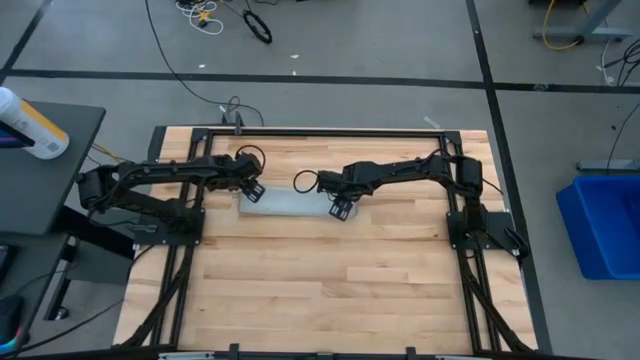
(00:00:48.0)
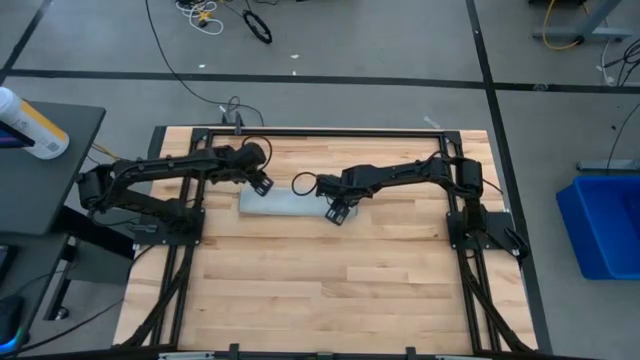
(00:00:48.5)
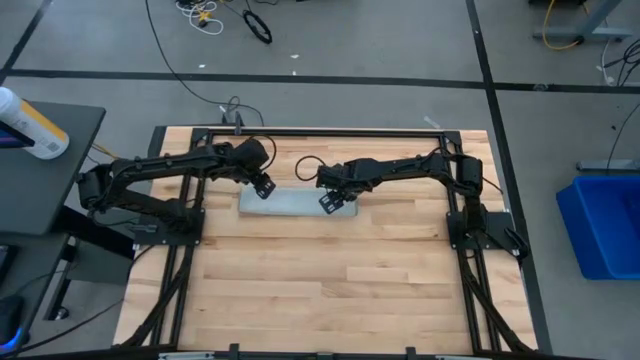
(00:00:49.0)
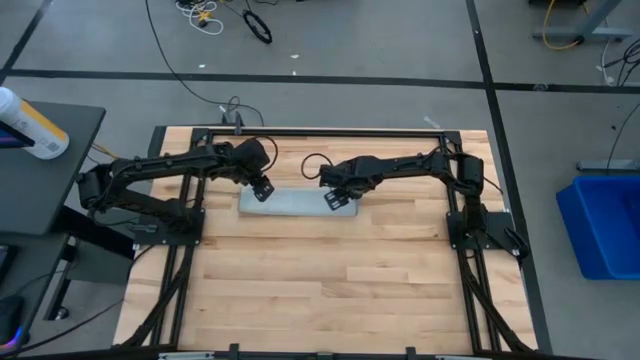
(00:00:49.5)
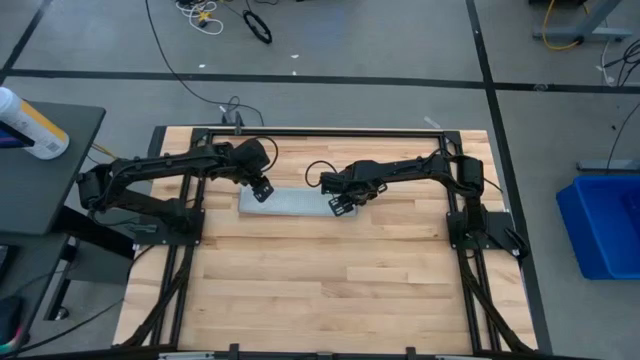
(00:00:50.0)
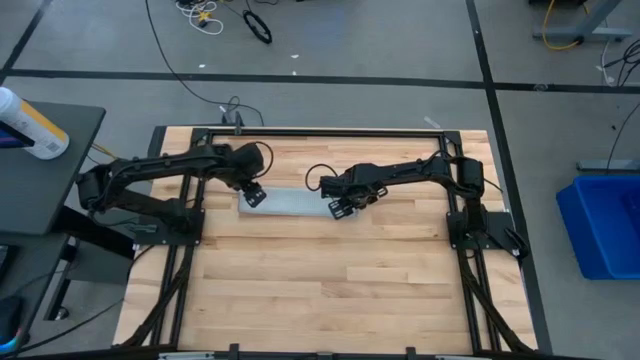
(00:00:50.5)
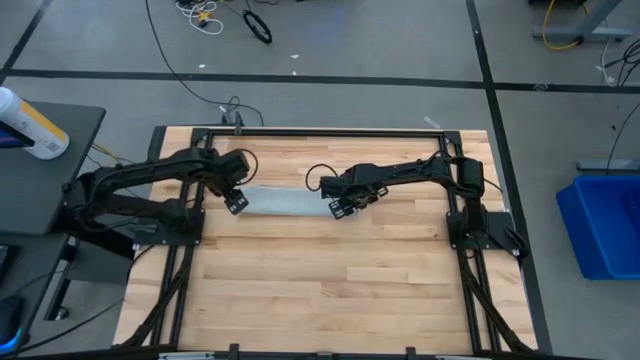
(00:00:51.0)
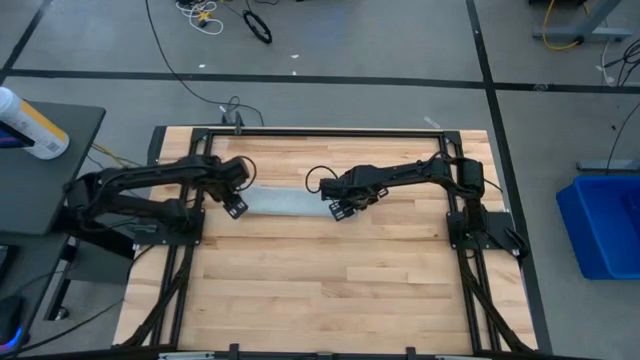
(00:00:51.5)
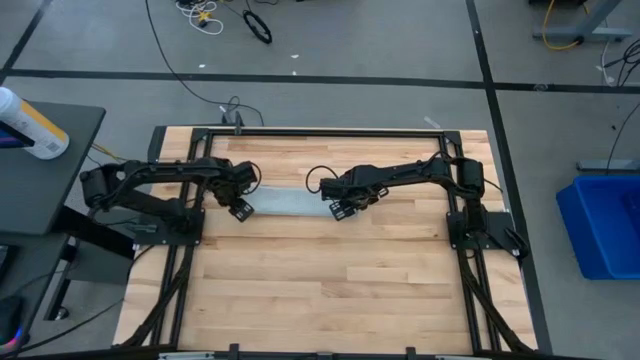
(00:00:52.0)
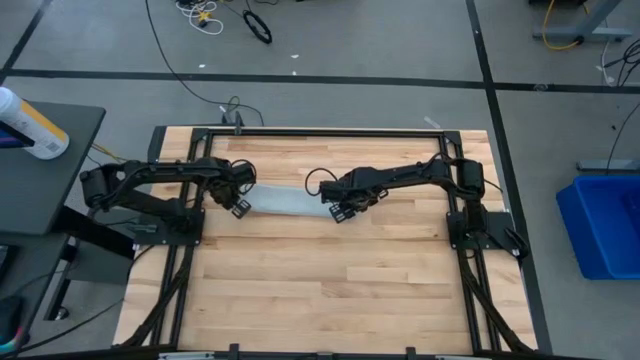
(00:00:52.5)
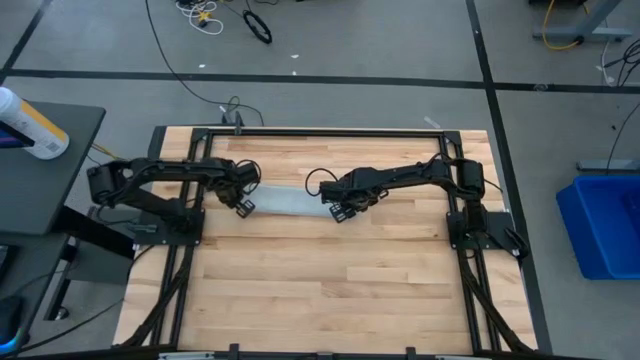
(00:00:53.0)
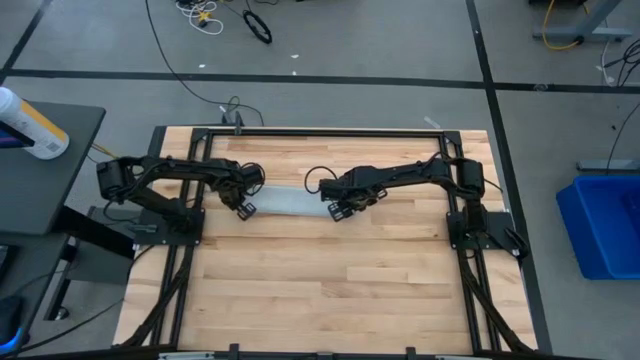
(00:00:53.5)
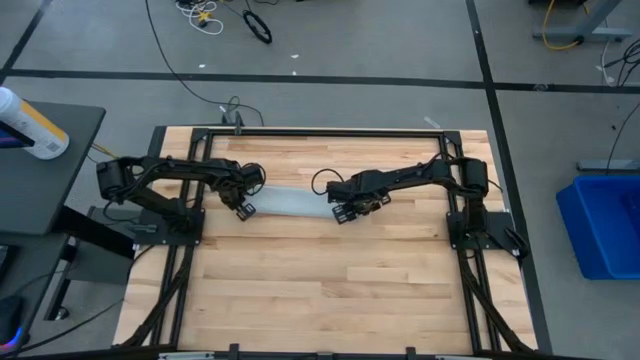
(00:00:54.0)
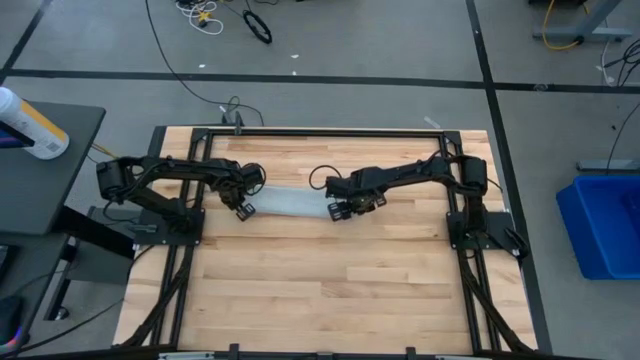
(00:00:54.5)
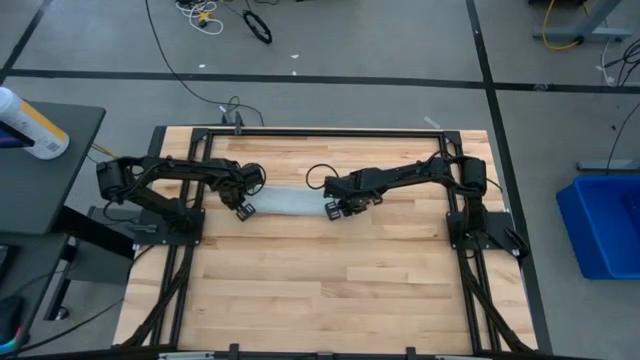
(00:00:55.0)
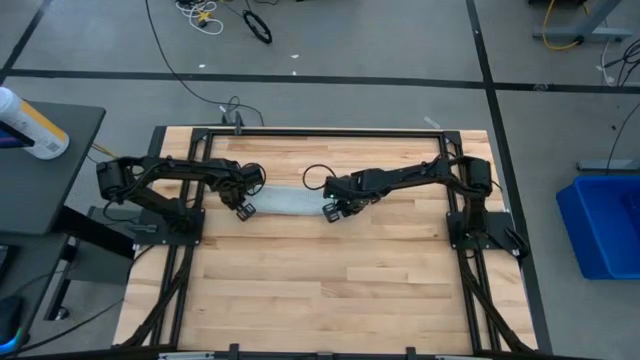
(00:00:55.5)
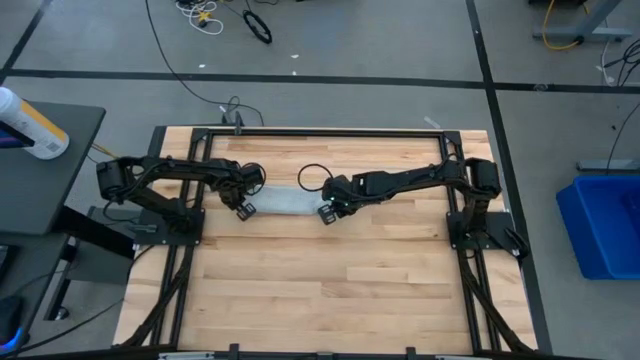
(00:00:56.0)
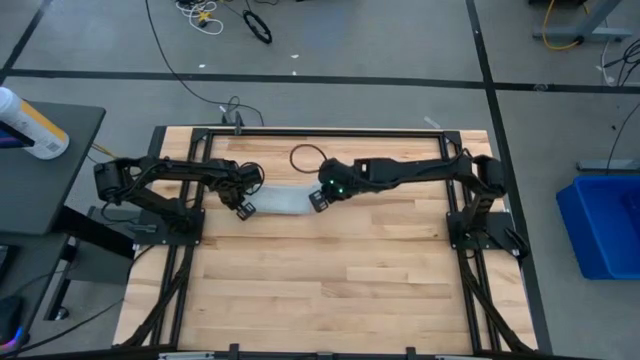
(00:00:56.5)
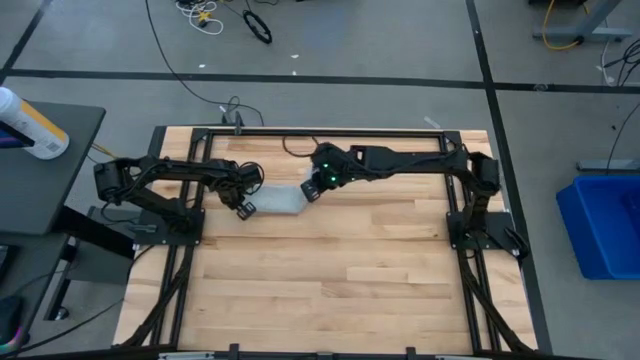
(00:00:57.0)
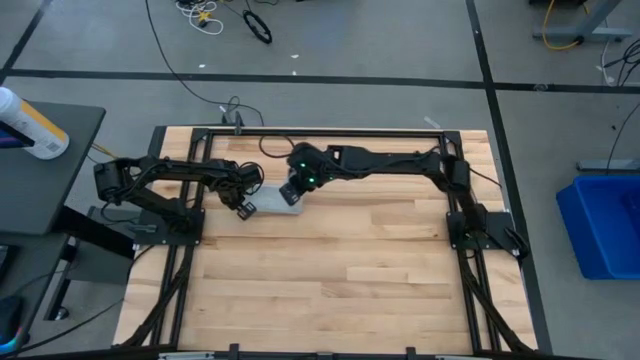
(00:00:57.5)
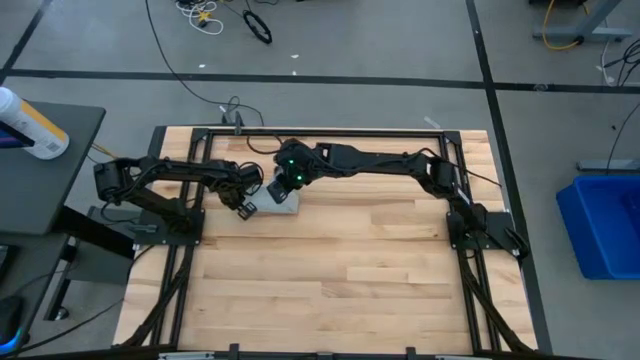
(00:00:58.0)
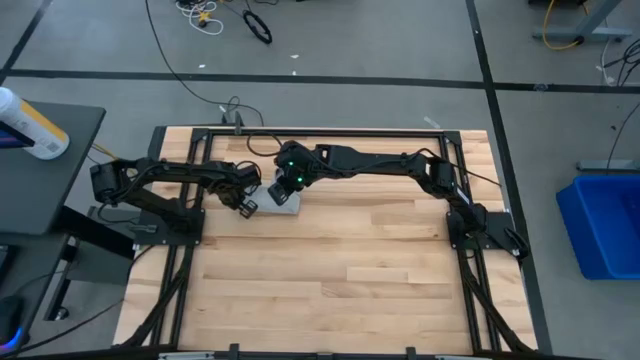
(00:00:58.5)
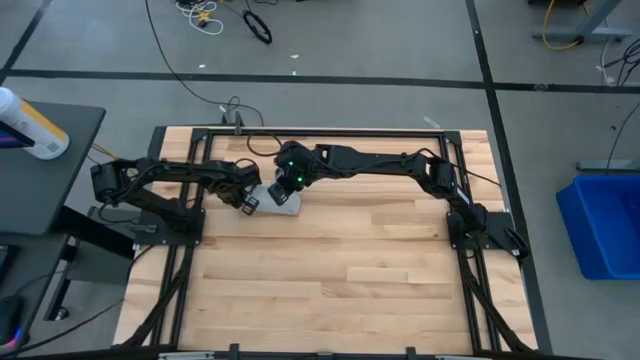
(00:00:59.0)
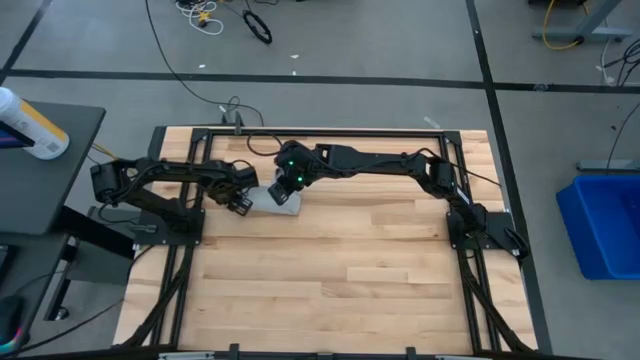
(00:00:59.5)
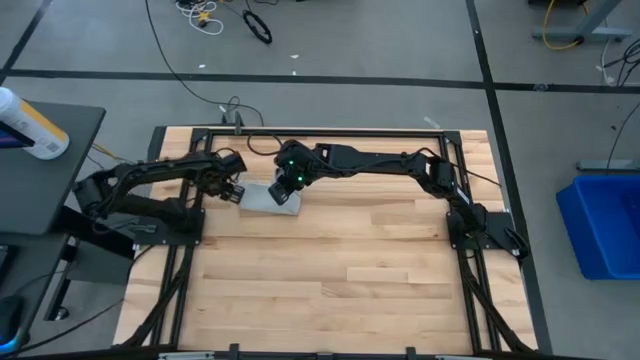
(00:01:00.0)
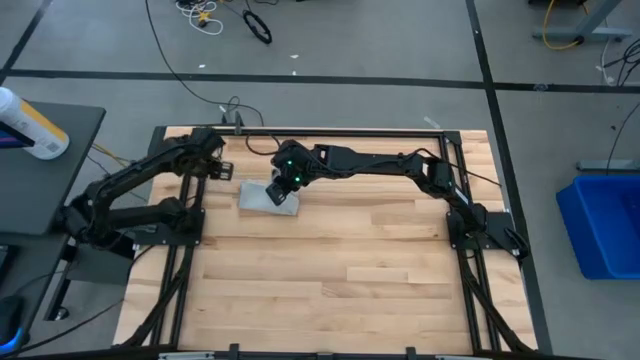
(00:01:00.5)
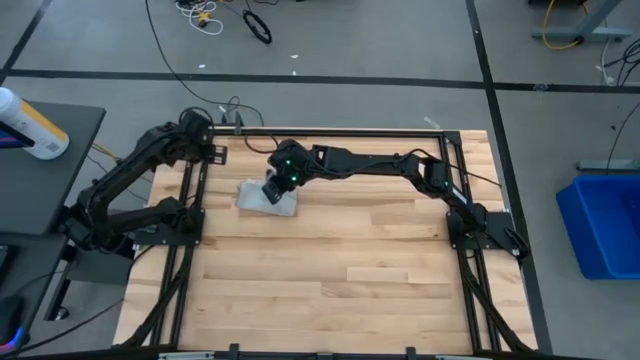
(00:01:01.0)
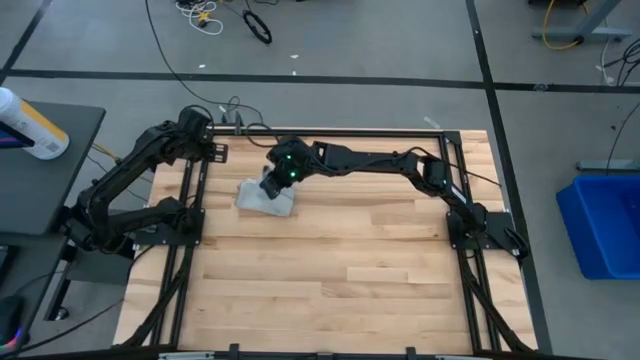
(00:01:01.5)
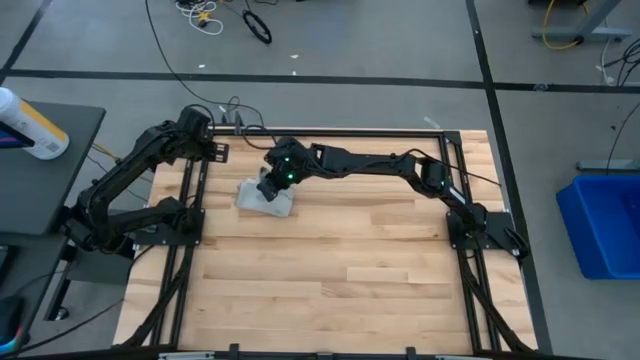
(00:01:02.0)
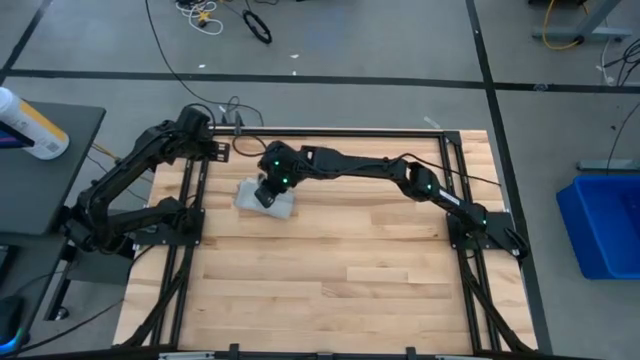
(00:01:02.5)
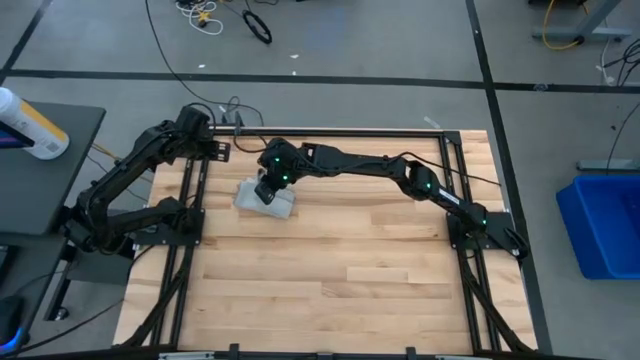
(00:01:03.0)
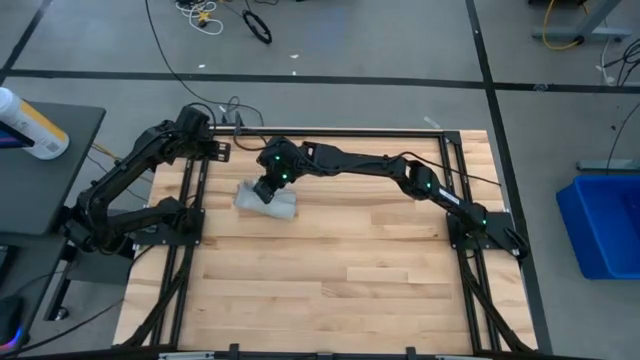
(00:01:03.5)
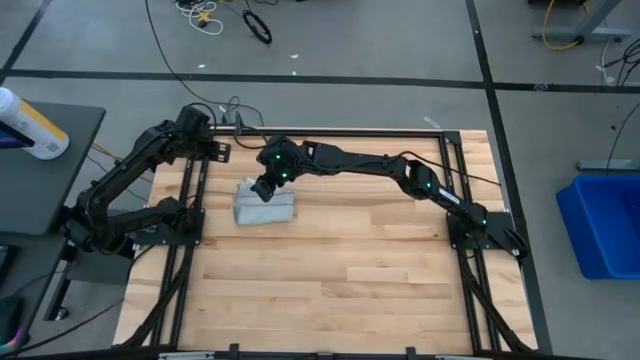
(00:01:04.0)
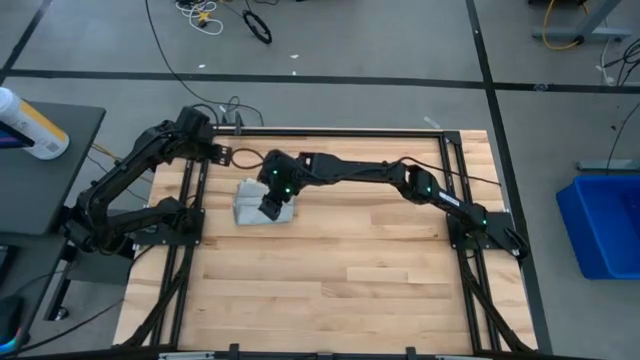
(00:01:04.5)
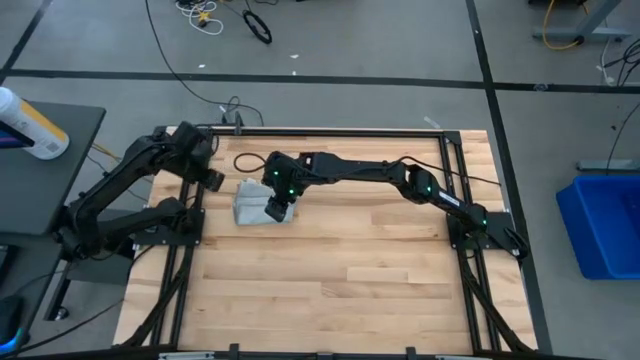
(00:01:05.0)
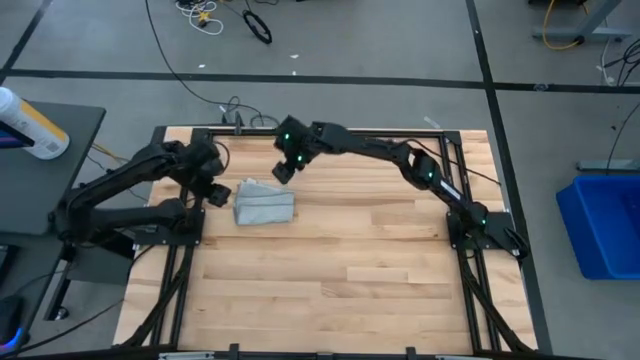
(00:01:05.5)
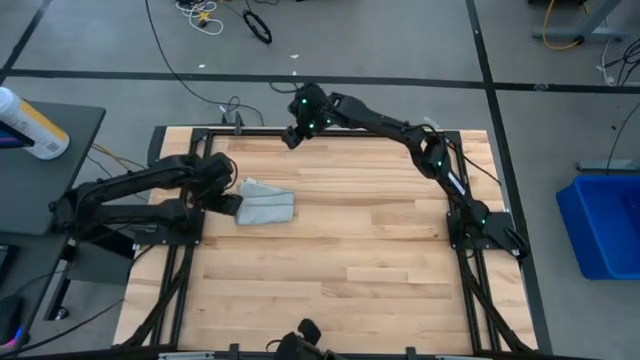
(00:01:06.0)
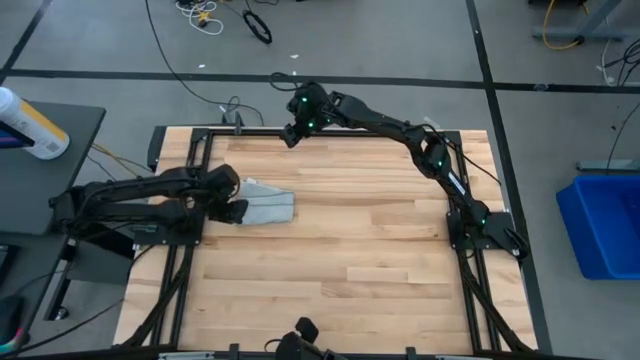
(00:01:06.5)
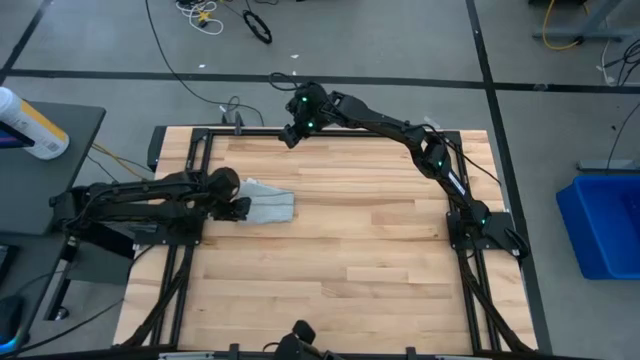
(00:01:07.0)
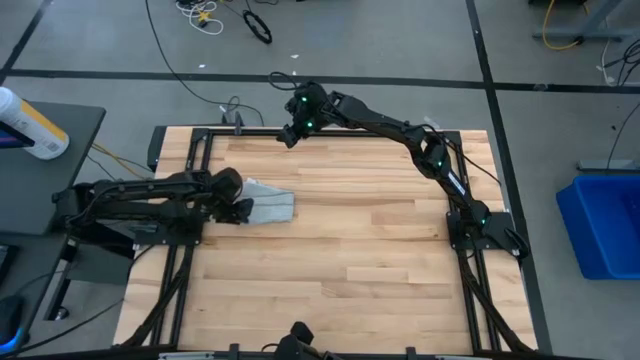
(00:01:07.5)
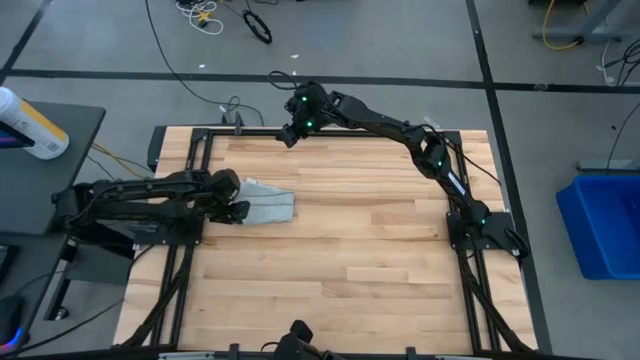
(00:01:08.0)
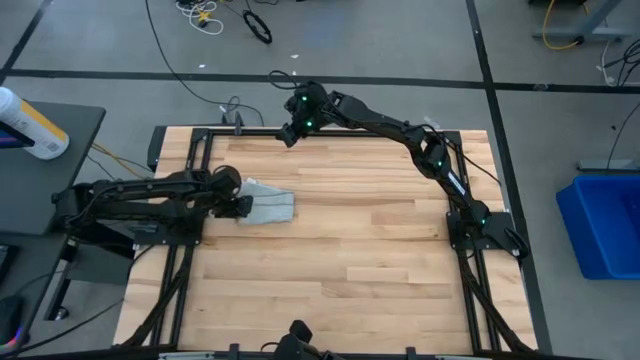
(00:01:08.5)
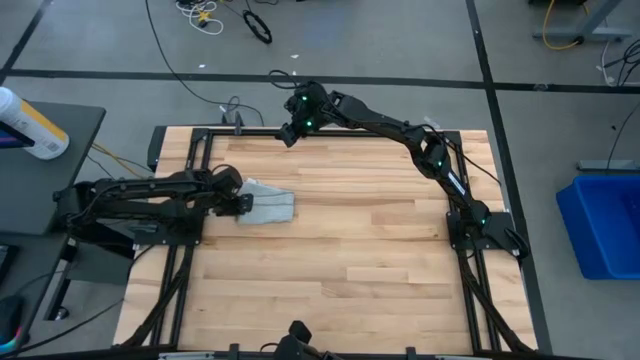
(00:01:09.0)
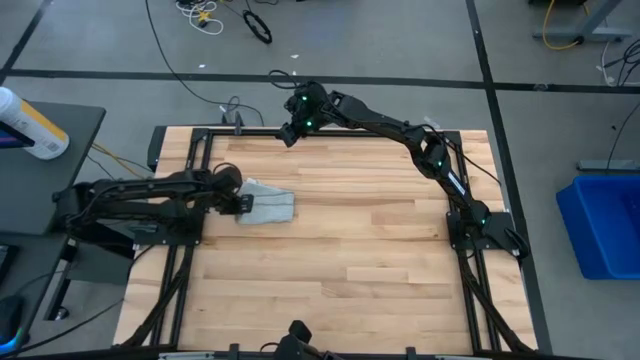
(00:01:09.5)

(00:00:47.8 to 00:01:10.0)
Task: Fold microfiber towels
Fold the gray microfiber towel
